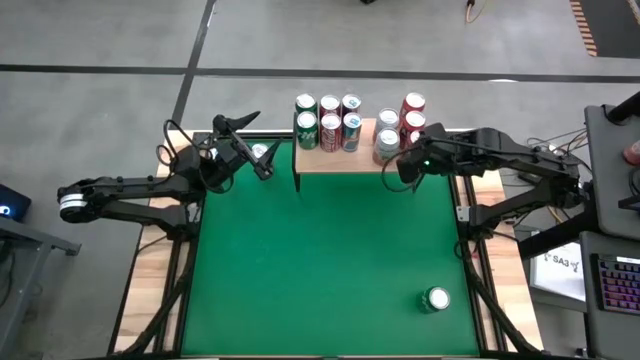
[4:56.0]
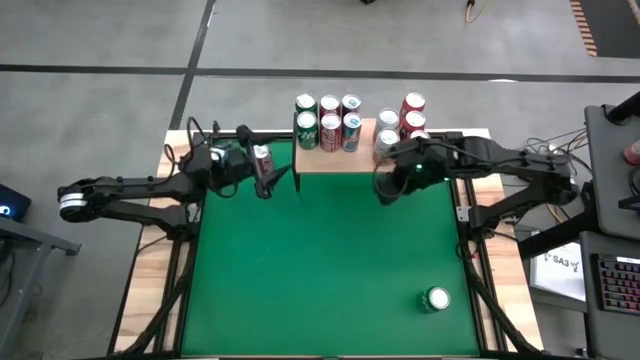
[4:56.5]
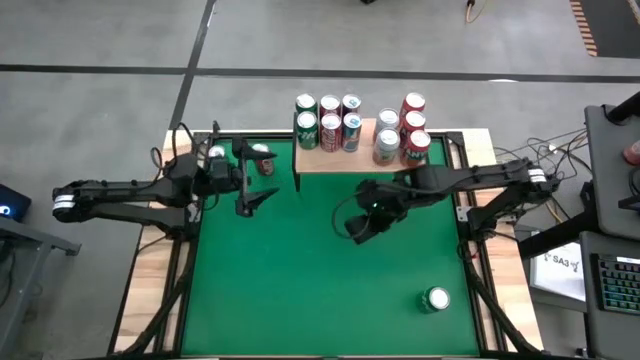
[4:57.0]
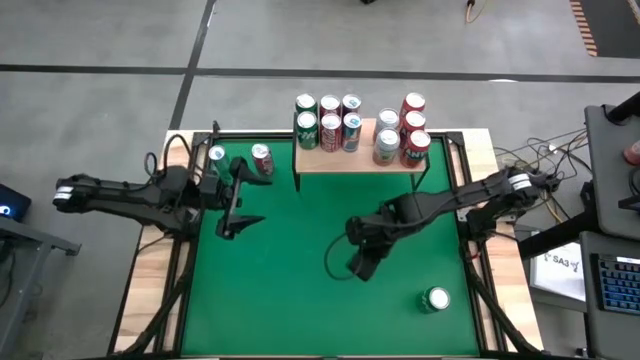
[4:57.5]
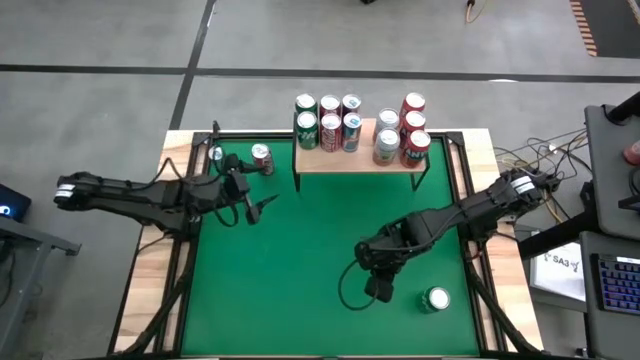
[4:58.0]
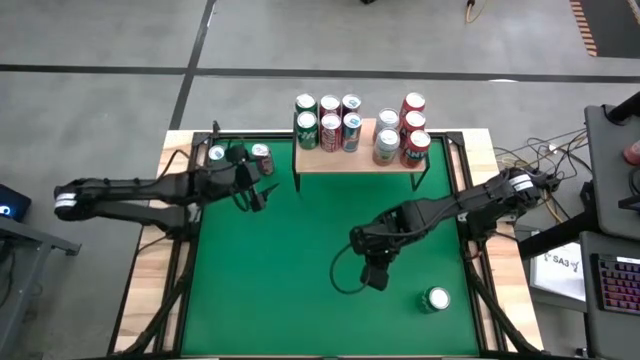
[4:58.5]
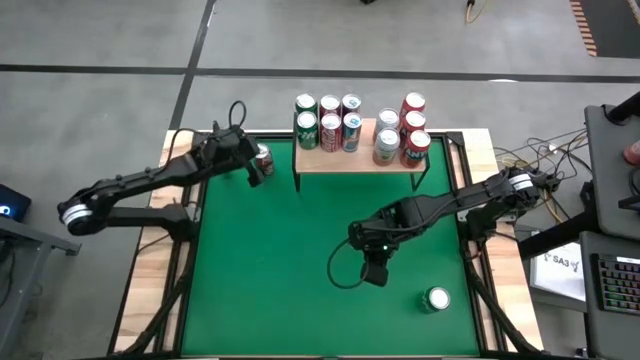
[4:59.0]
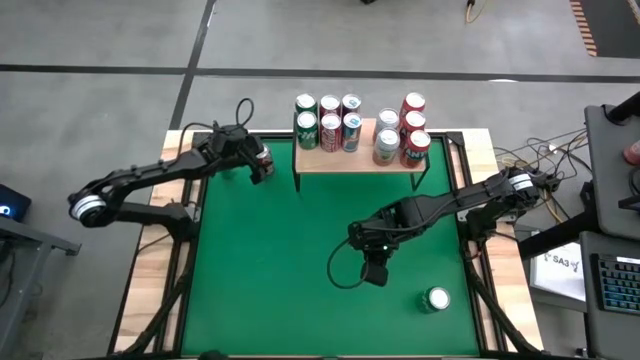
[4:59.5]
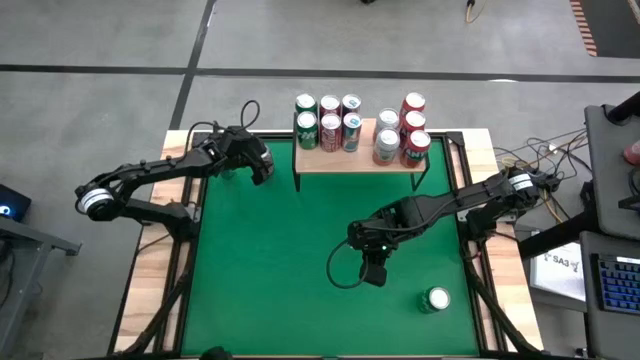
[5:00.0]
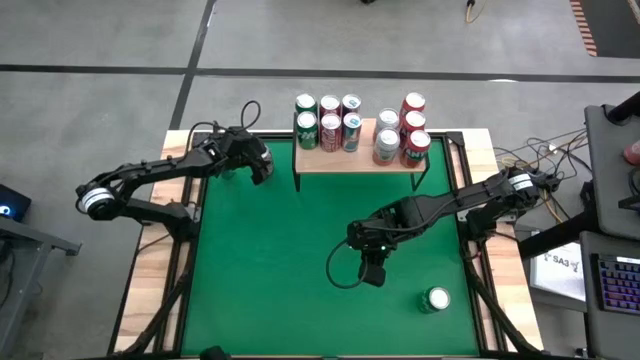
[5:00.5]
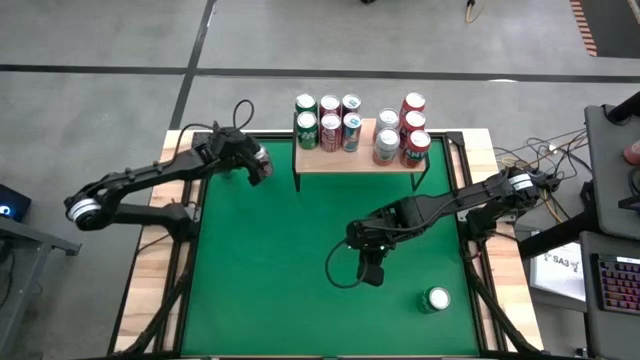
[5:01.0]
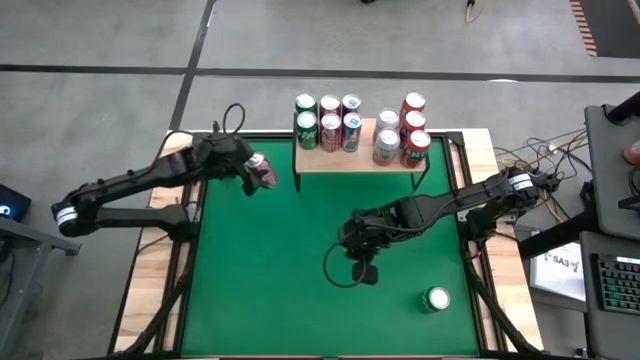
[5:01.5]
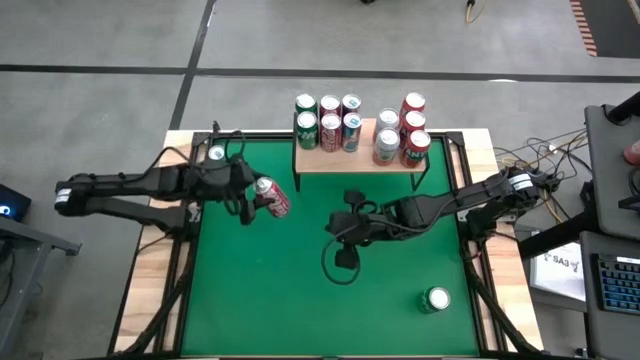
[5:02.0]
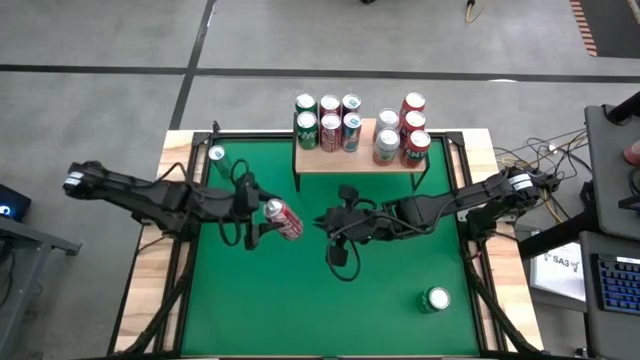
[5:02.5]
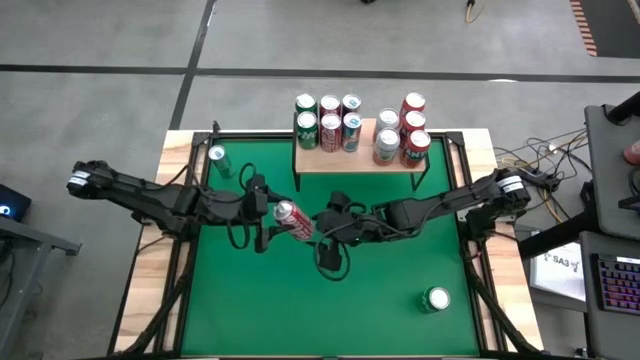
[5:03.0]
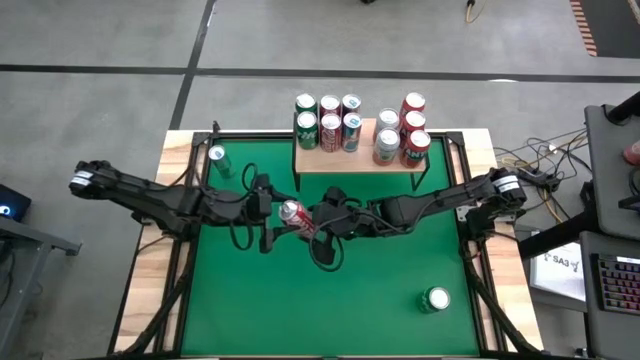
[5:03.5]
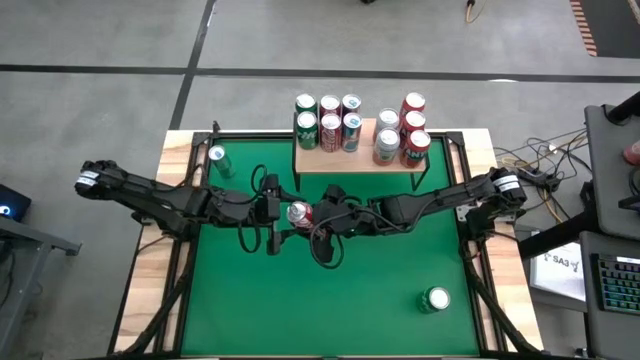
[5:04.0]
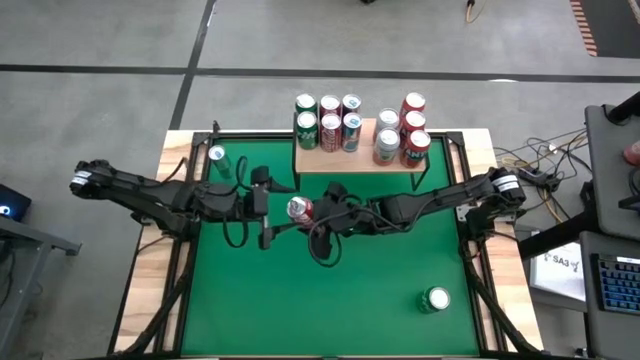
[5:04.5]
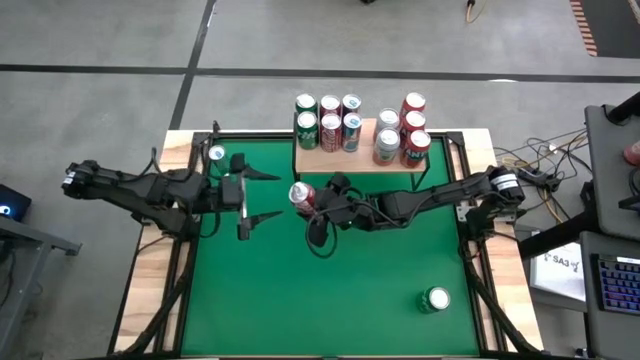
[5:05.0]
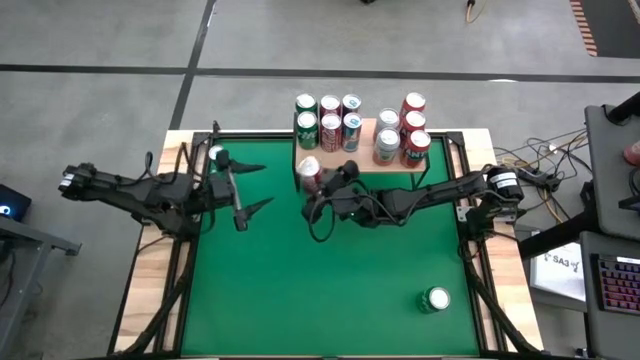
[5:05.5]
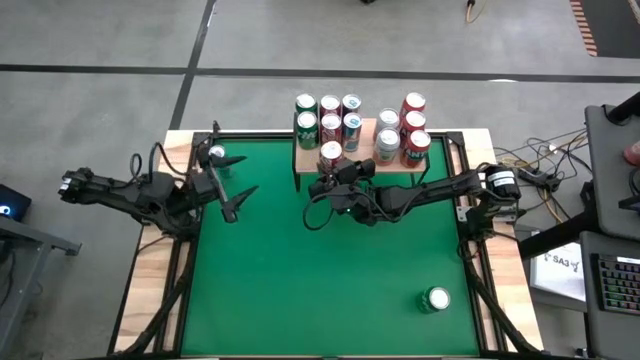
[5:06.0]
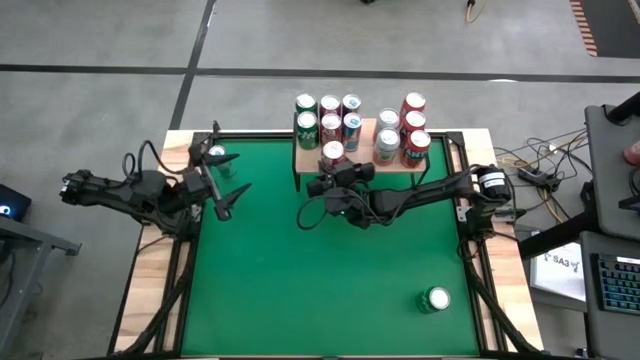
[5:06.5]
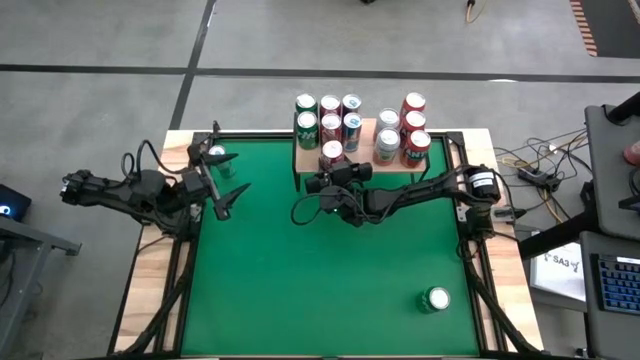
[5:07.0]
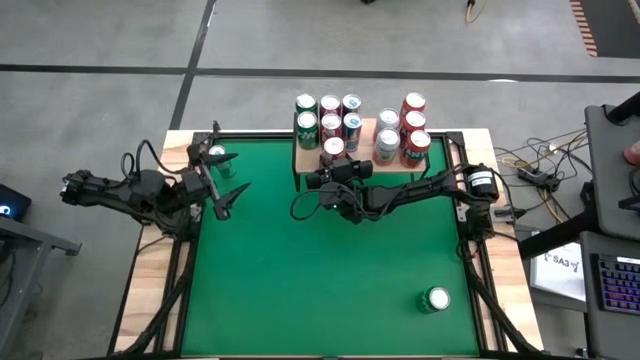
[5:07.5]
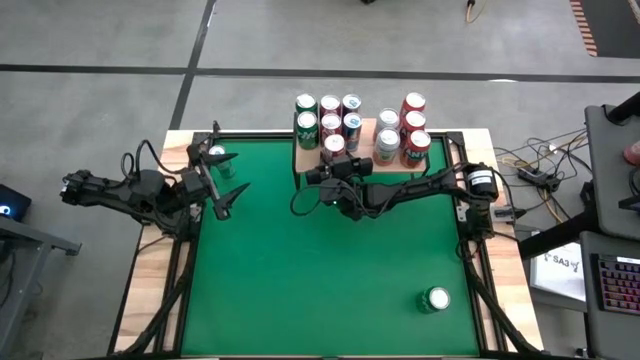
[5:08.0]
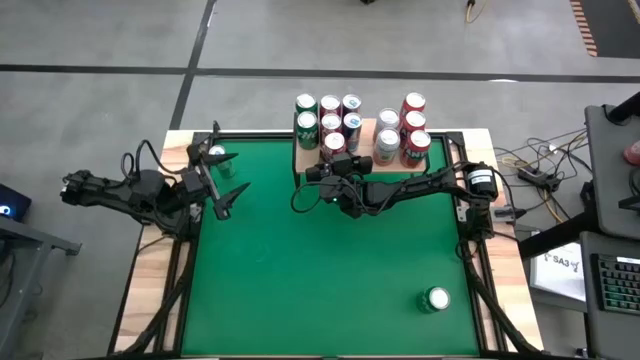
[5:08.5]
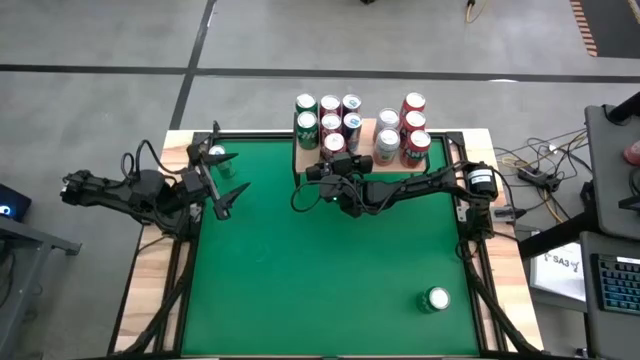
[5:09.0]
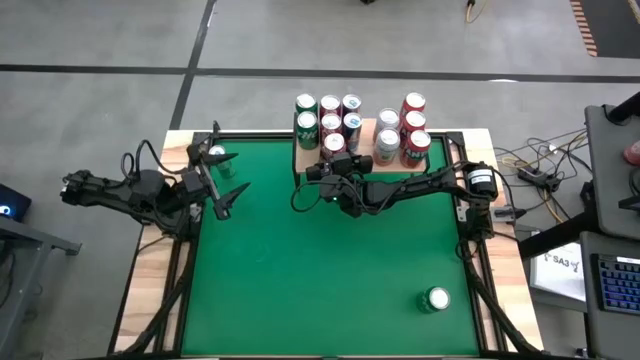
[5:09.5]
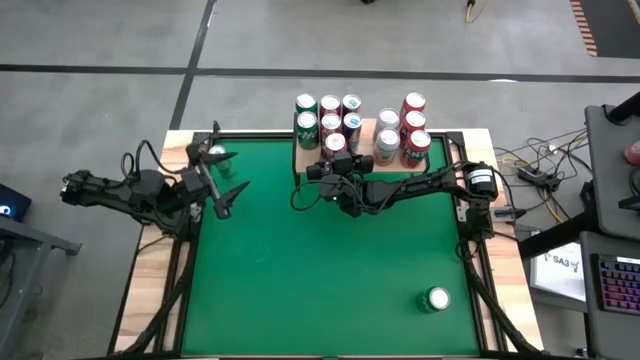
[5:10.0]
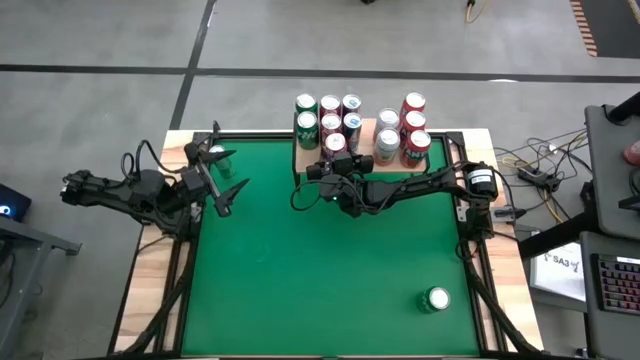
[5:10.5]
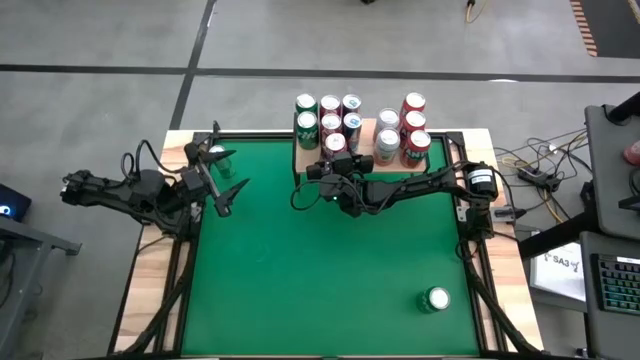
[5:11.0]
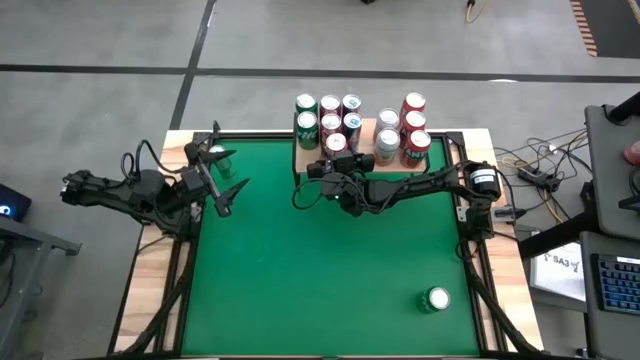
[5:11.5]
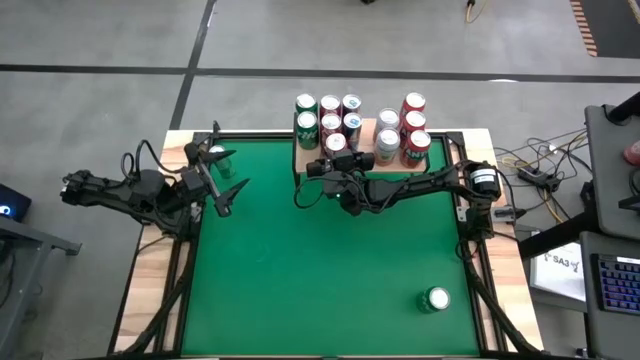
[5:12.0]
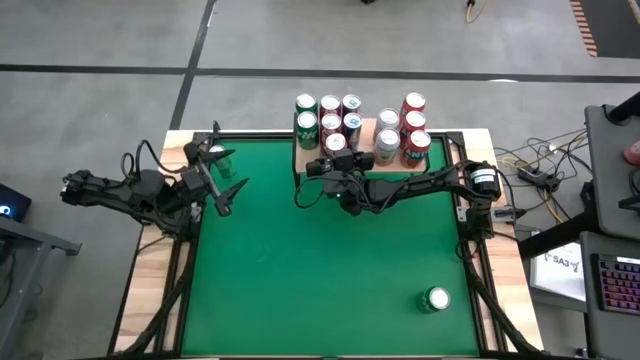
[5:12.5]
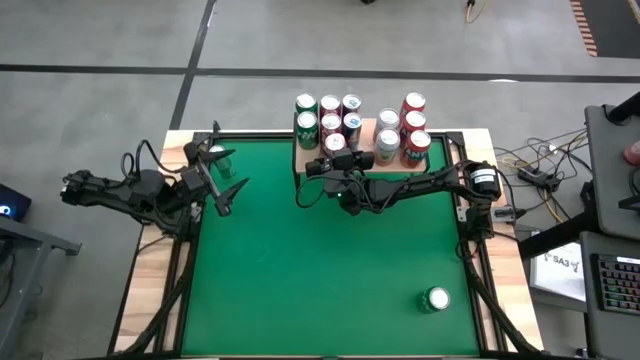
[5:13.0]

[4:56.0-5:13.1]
Task: Place canned beverage on shelf
Put the red soda can aligned with the red soda can on the shelf

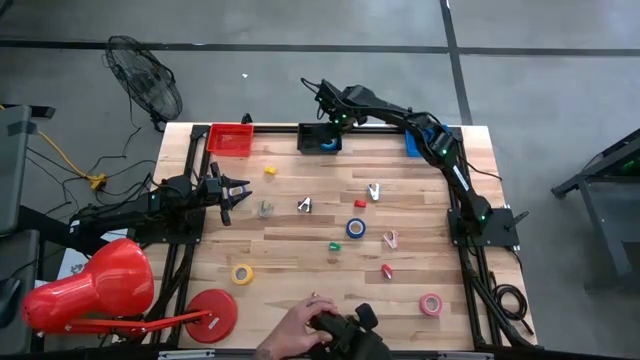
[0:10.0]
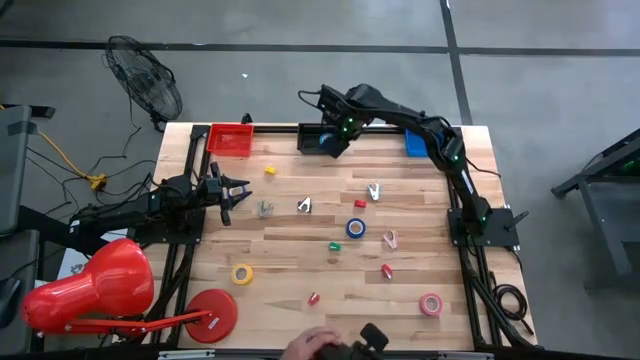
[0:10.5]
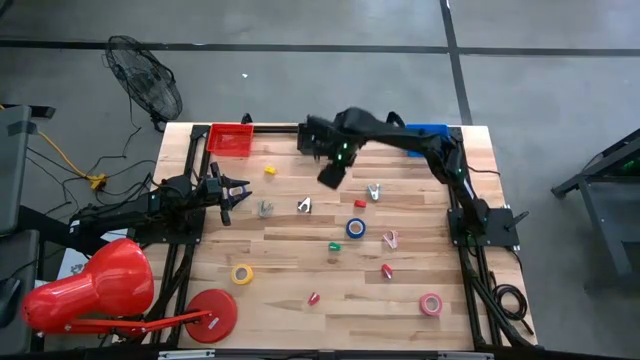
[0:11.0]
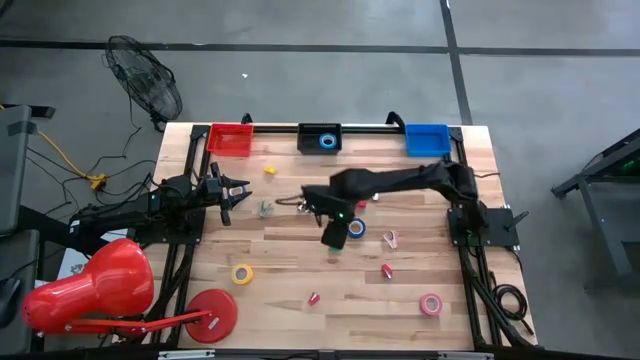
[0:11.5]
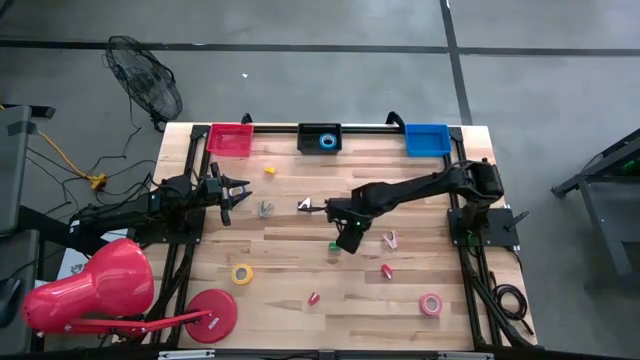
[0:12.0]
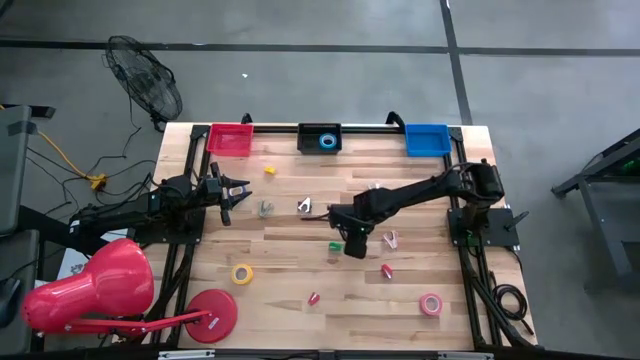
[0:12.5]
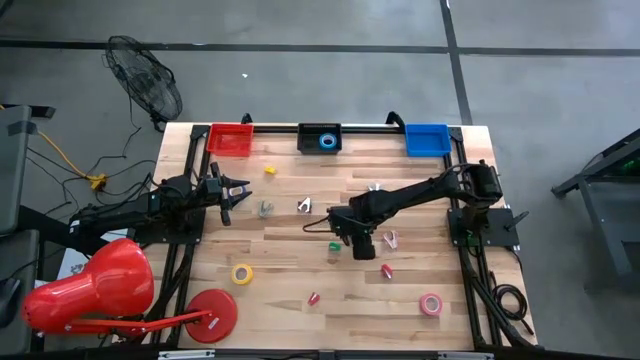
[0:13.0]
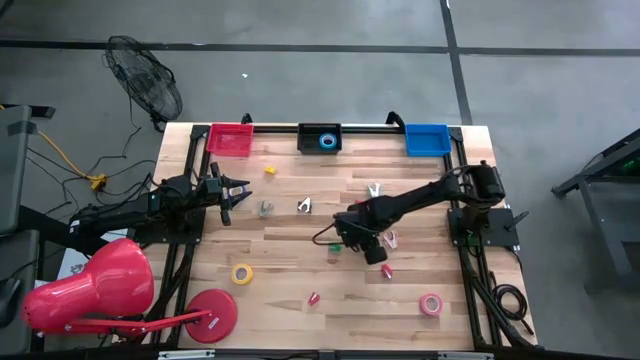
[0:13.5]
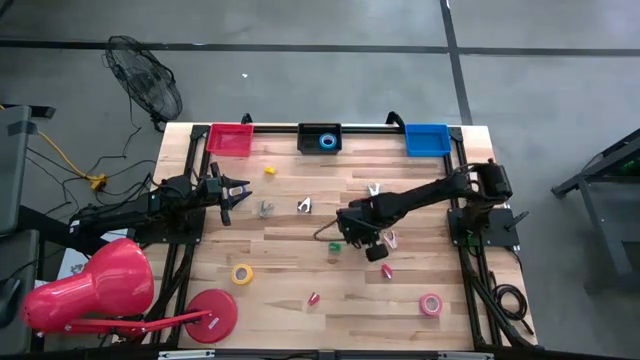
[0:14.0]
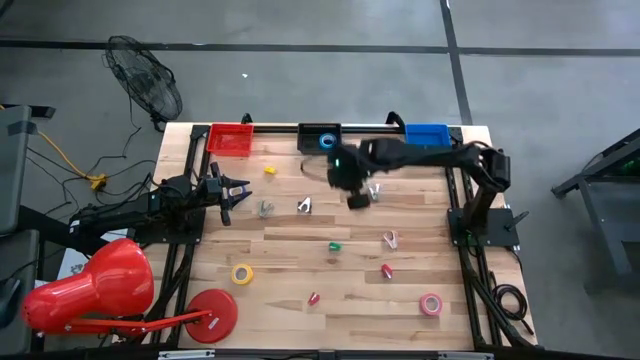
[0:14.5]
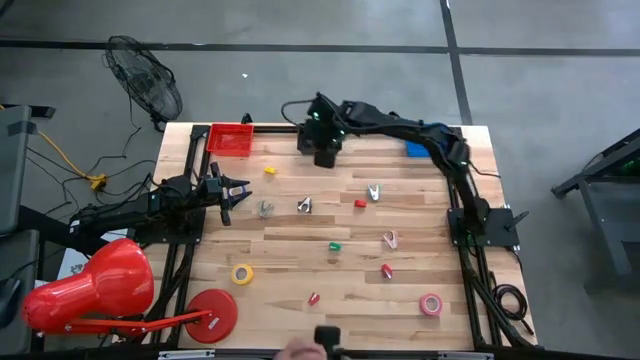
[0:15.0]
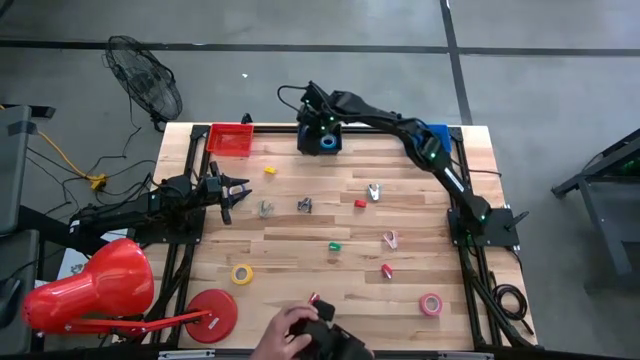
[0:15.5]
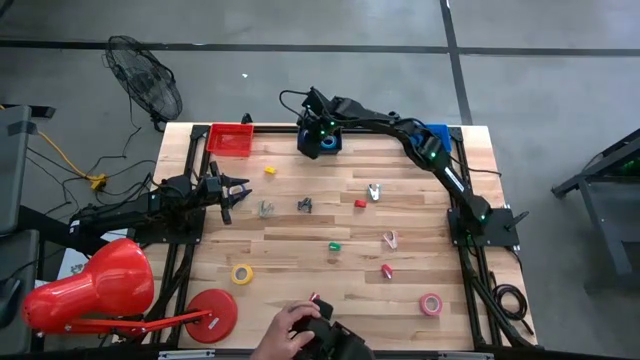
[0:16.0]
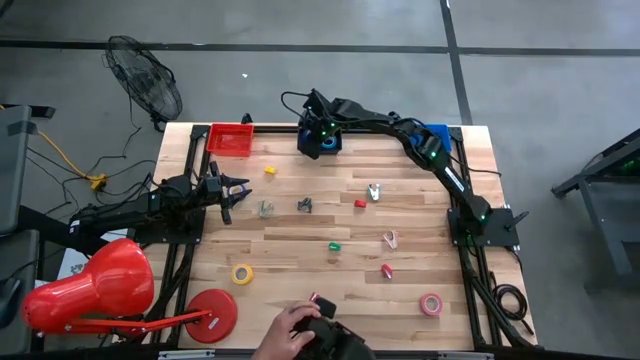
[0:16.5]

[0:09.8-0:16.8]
Task: Pick and place Stapler, Stapler remover, tape
Put the bottom blue tape into the black bin
